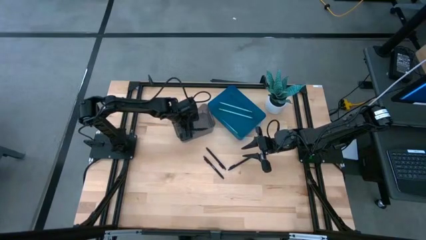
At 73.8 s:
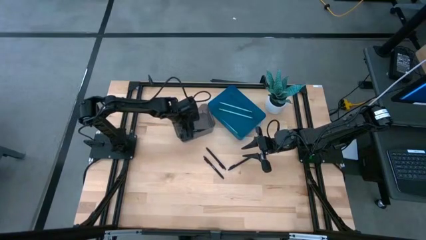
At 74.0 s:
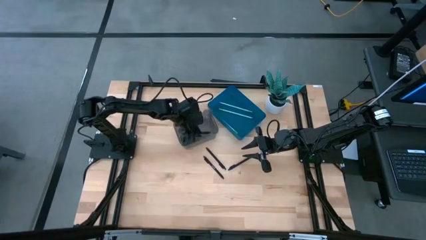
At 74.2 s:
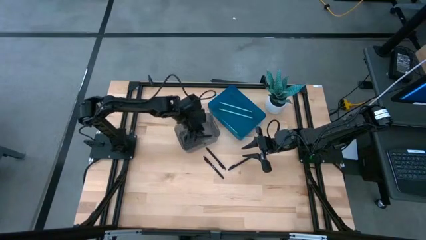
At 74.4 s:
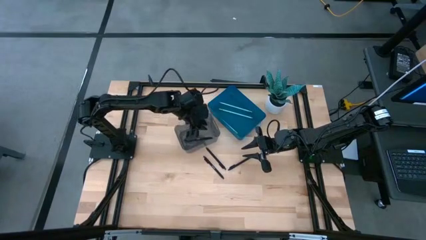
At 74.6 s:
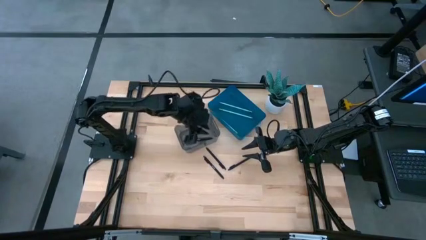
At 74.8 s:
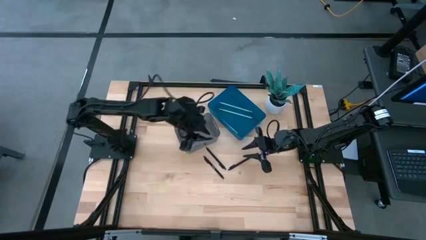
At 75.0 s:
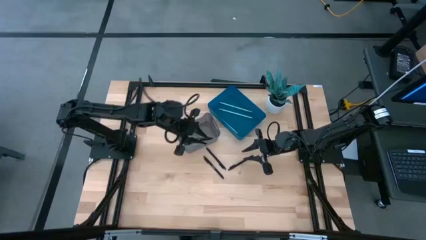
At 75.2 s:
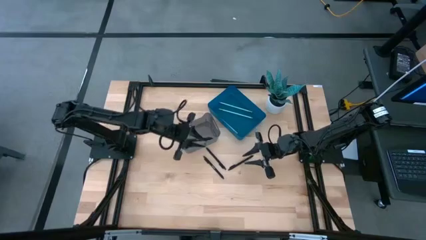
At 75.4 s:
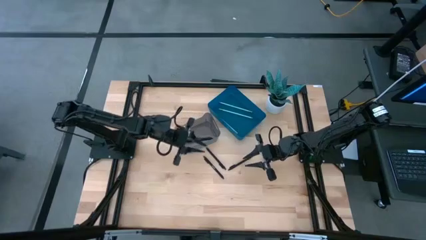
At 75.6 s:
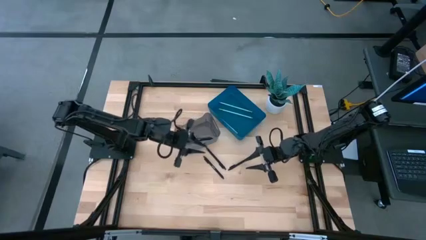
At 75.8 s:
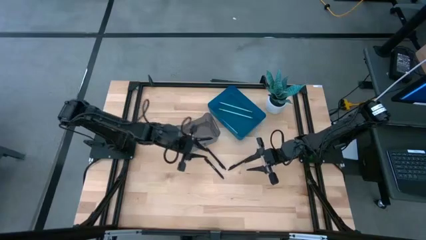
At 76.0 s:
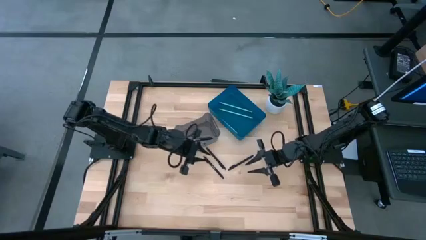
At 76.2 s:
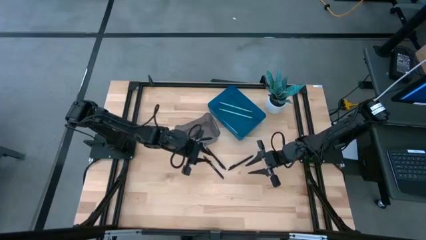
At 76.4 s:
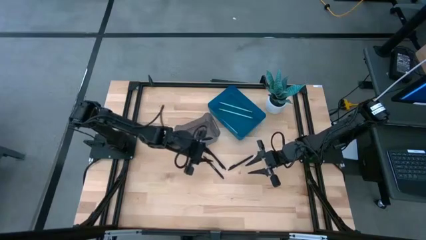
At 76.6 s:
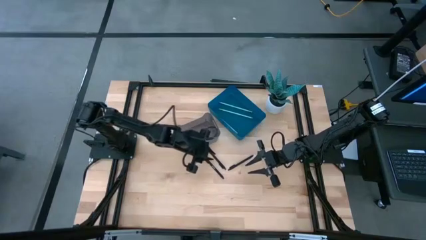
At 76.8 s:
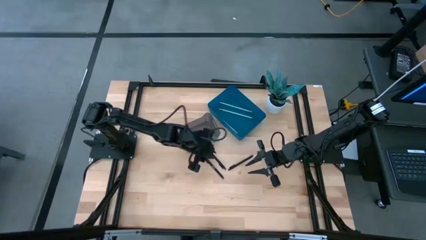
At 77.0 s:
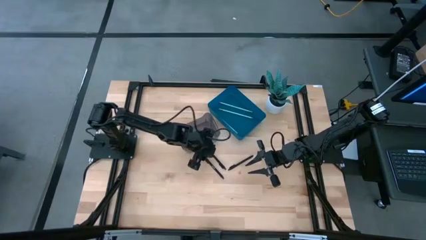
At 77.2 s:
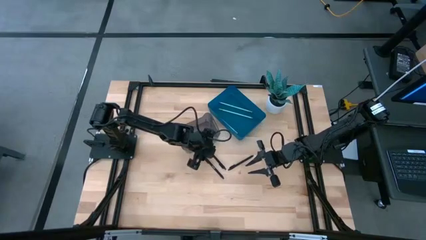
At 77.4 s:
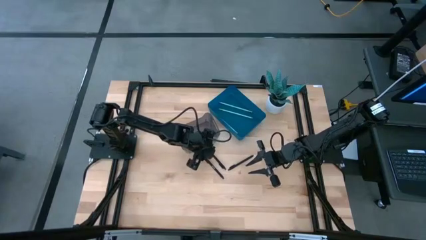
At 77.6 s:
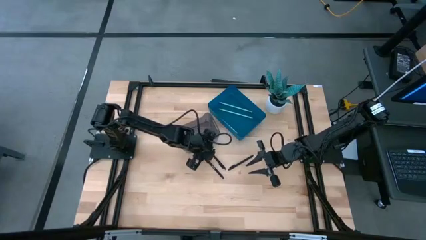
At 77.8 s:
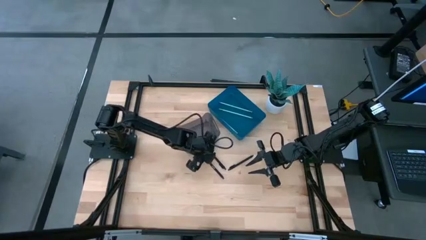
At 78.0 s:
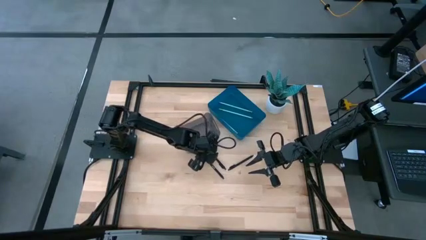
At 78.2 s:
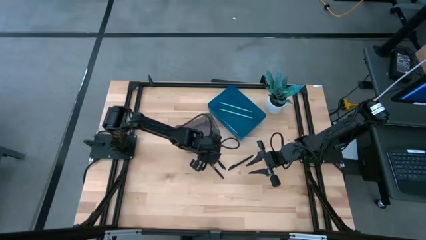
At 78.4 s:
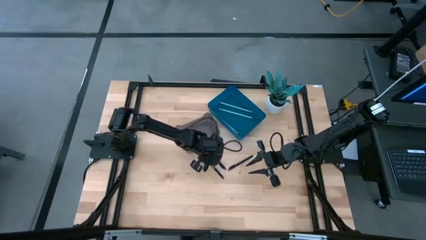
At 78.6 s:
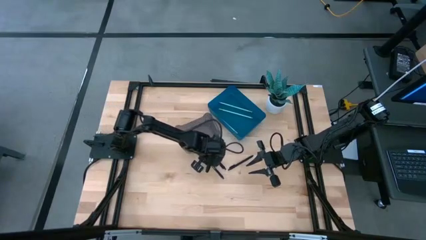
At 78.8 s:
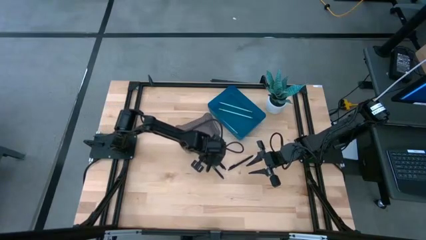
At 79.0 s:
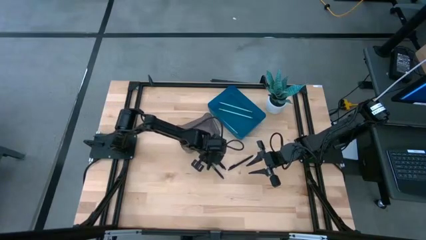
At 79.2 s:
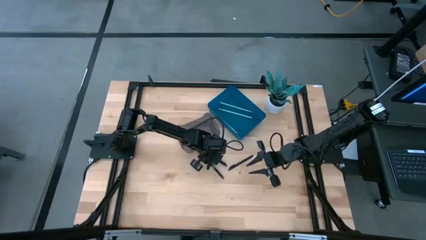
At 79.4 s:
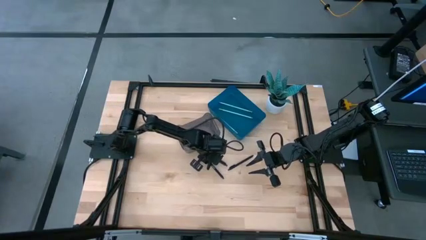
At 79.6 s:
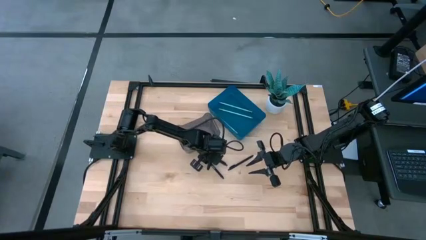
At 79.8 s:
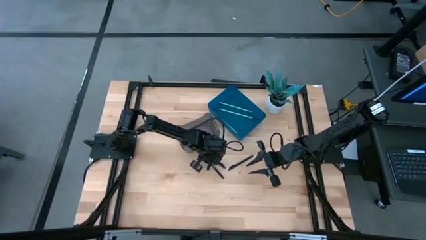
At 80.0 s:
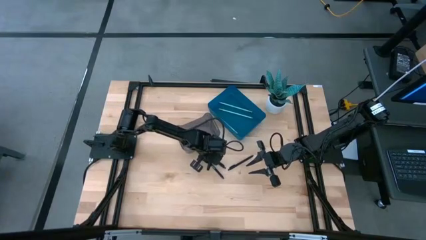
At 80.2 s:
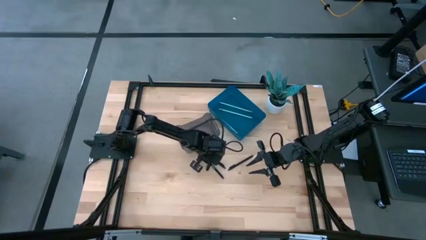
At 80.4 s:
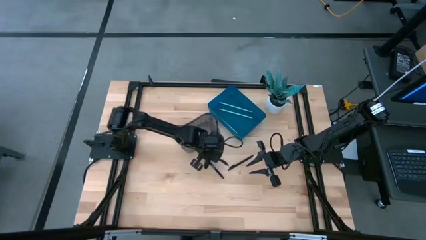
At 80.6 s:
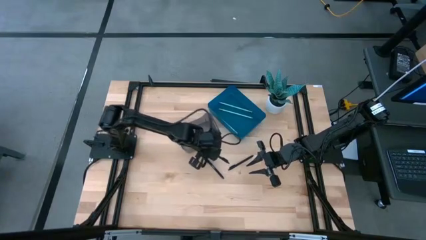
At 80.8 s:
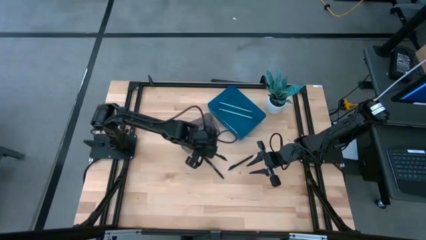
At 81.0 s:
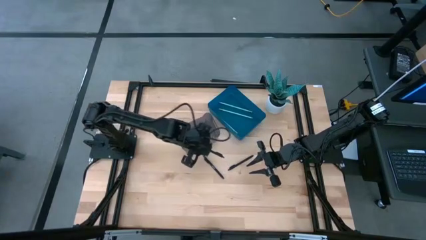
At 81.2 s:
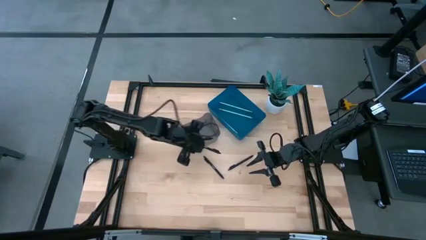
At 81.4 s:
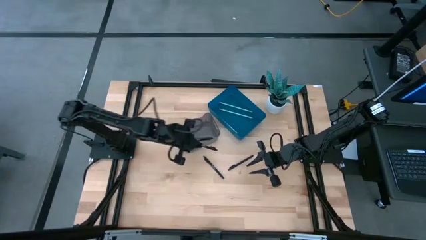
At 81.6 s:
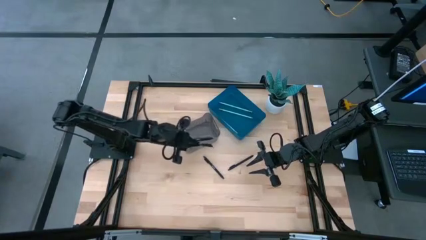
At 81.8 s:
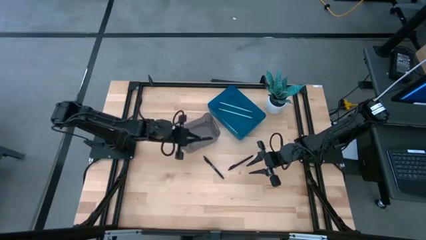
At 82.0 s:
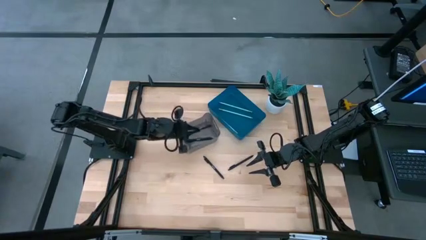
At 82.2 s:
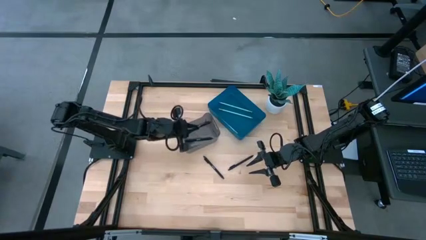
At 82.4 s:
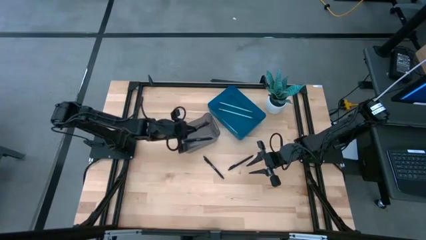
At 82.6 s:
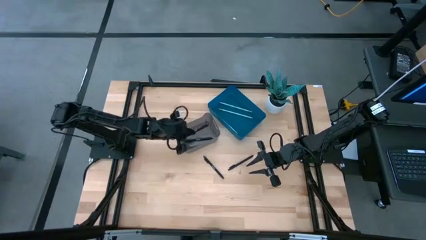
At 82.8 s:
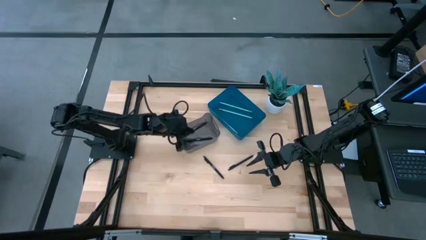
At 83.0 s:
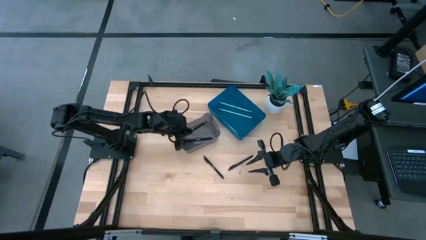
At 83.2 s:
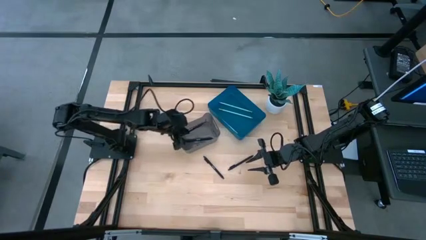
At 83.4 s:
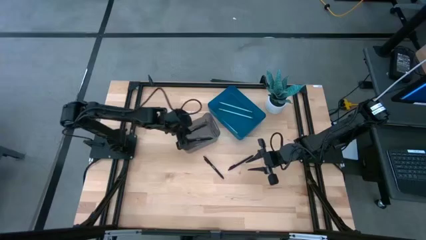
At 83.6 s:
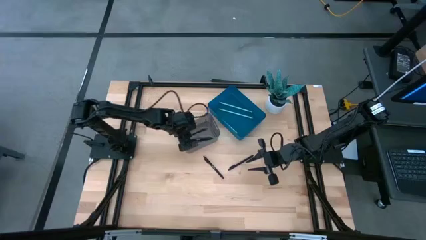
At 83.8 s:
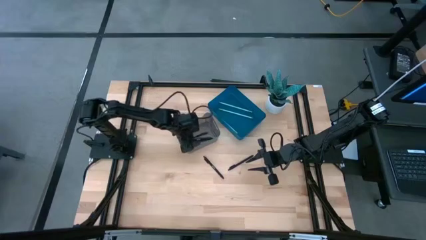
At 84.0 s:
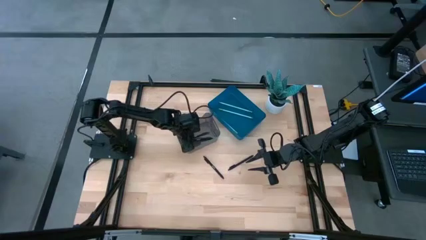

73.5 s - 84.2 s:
Task: Sort pens & pencils
Put the black pen into the black bin

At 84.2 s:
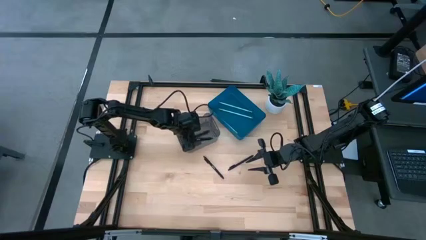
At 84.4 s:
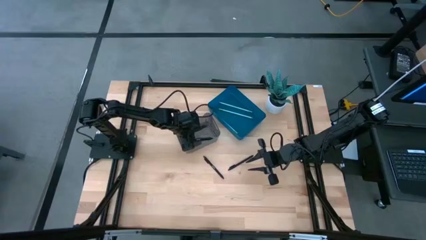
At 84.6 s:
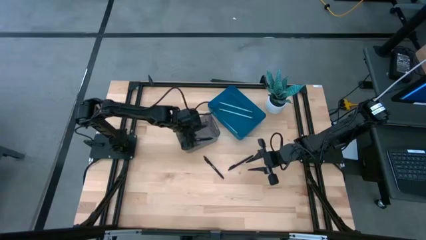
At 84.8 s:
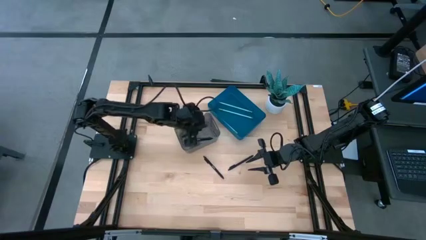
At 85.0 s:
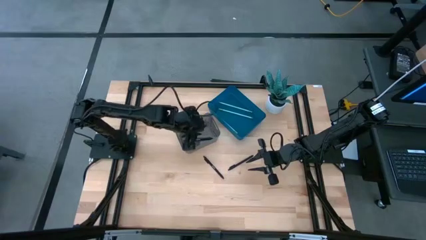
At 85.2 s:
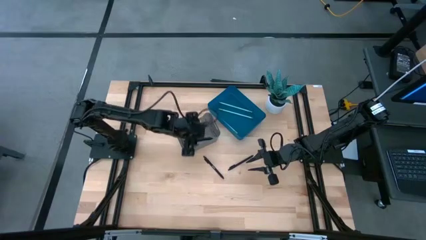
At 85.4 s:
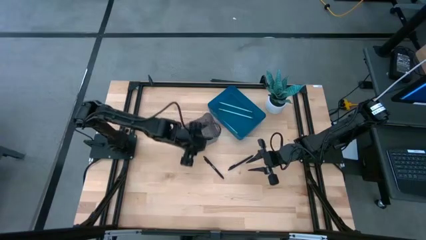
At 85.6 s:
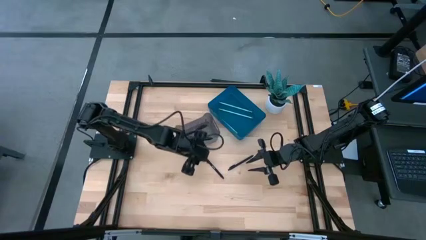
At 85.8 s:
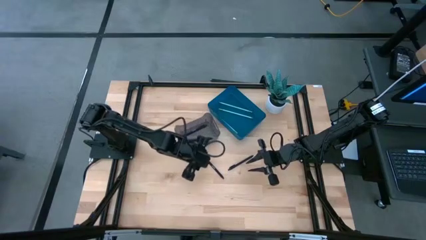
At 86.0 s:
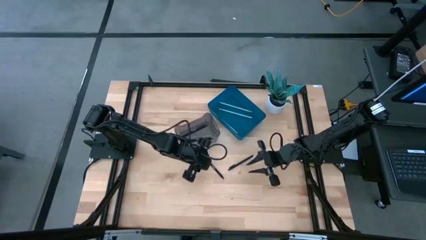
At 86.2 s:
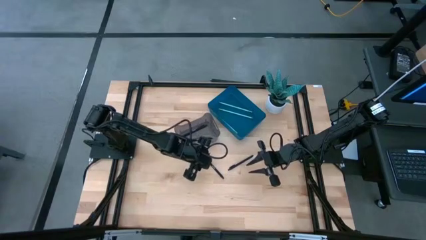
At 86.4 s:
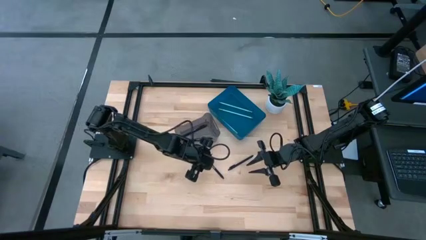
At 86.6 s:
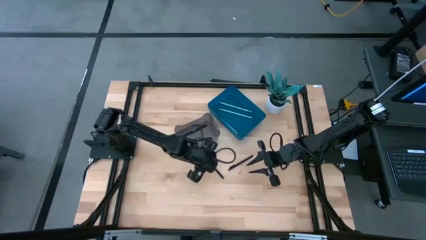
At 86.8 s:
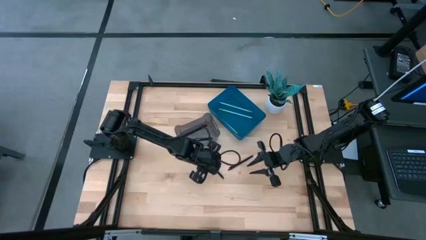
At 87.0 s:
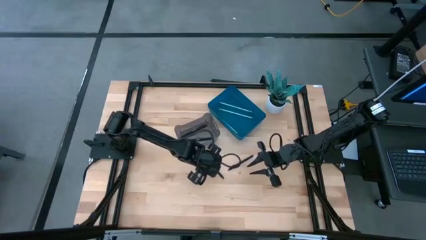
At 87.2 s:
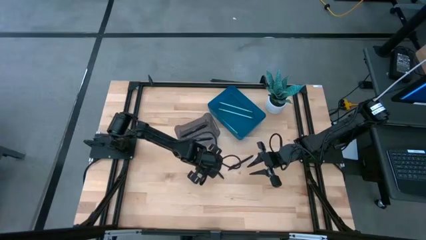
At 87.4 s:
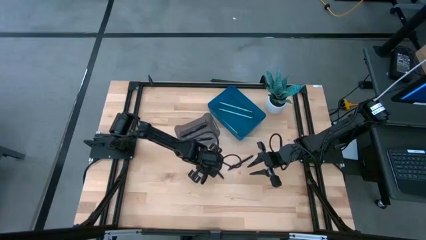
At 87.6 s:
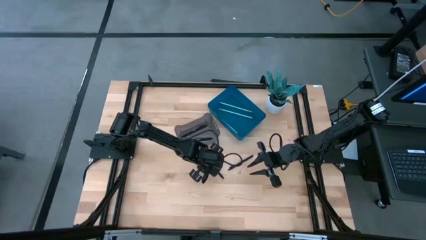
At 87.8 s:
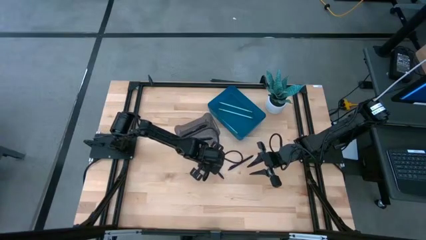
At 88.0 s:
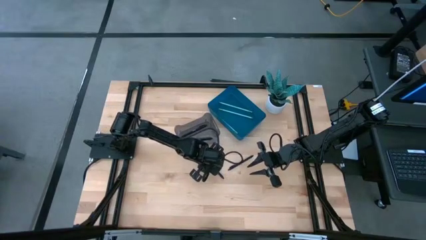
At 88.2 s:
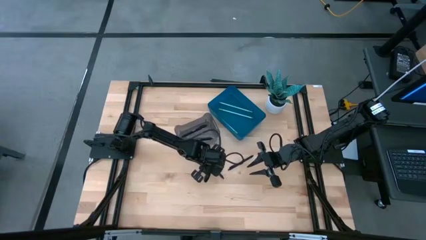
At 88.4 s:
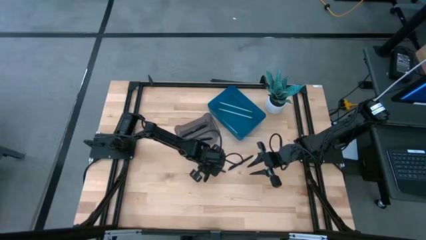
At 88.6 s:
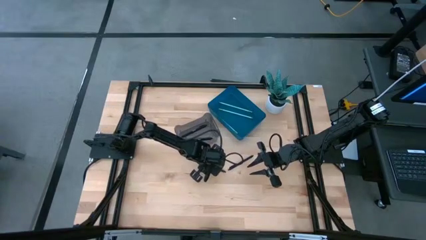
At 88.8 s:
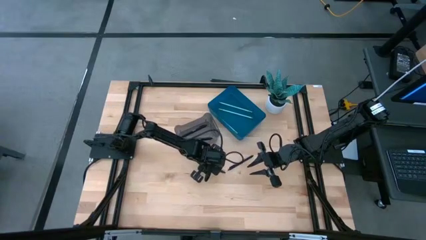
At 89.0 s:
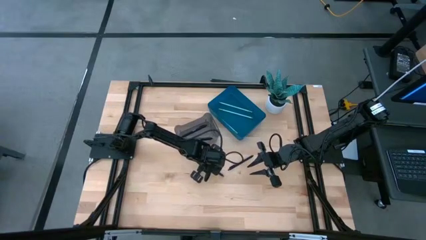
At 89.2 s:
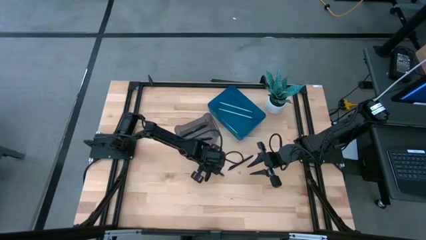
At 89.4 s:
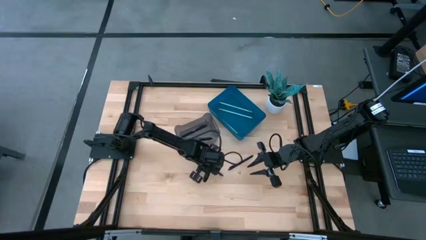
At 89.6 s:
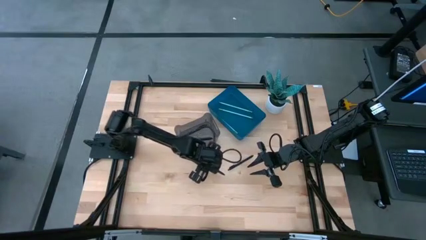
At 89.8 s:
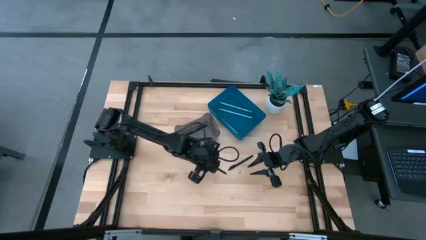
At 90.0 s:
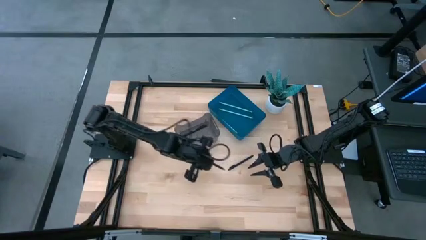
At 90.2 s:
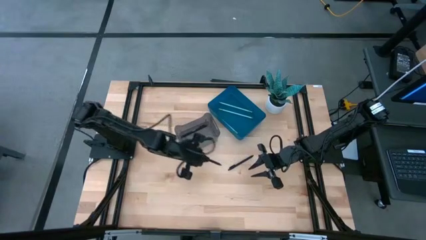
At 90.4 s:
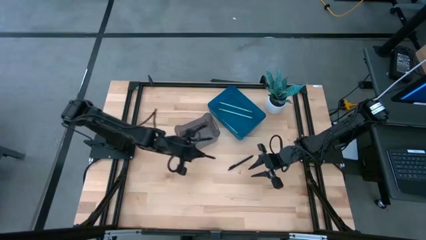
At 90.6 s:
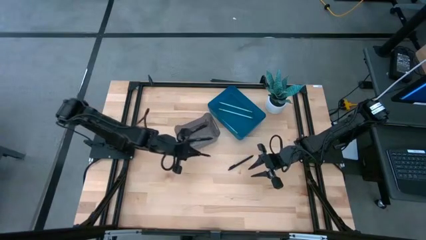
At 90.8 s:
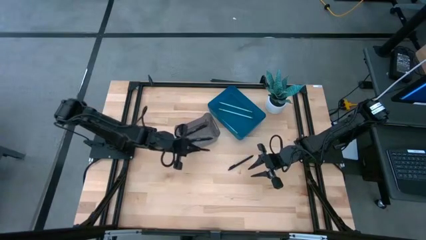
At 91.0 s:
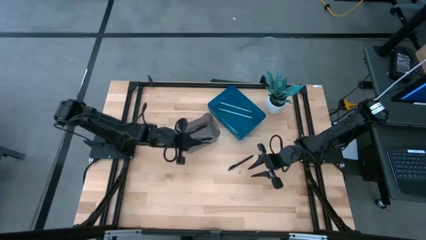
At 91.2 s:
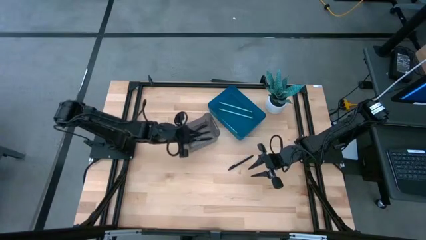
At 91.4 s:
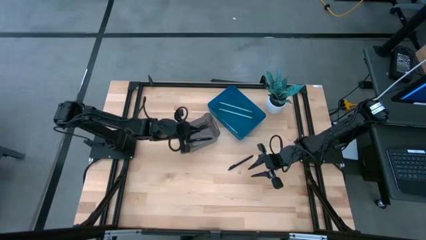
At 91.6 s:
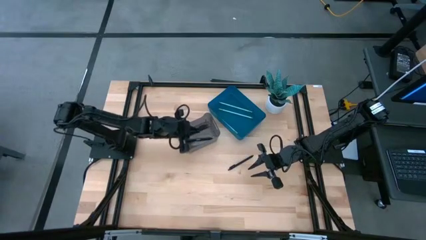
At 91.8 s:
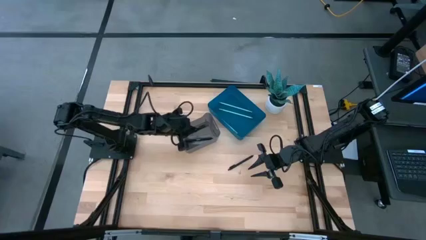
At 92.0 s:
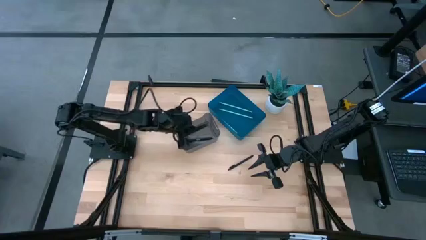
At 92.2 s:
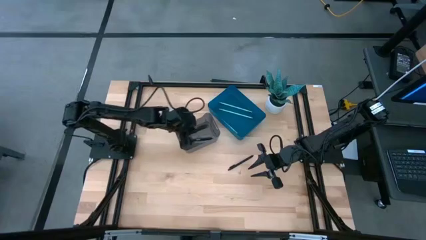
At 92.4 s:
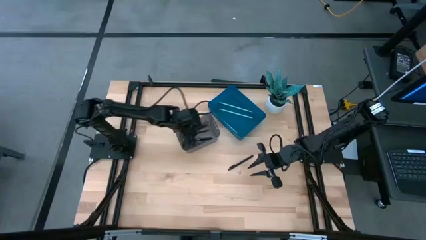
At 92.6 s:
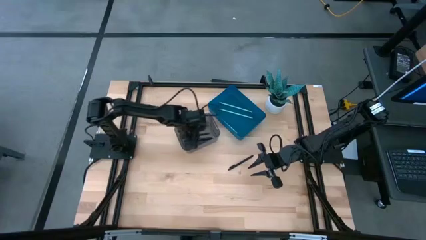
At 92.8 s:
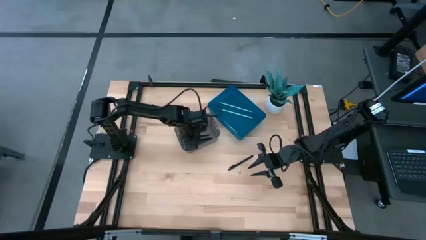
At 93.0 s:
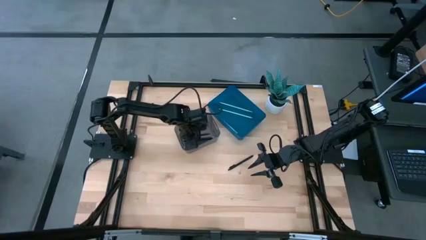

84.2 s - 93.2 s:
Put the black pen into the black bin
